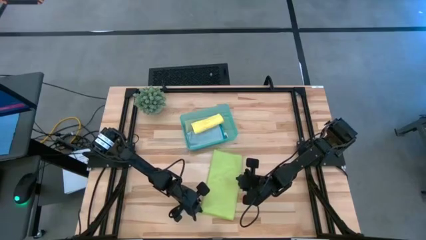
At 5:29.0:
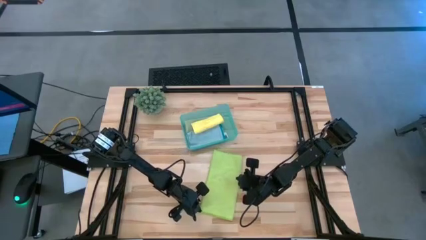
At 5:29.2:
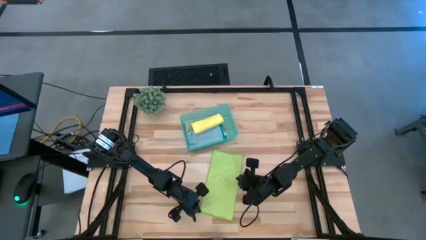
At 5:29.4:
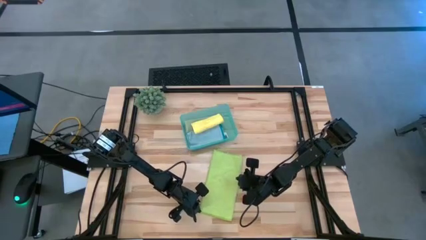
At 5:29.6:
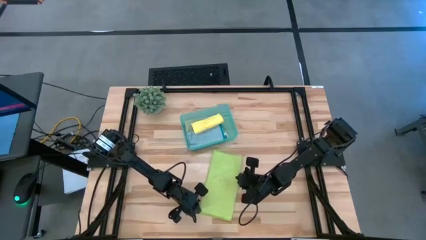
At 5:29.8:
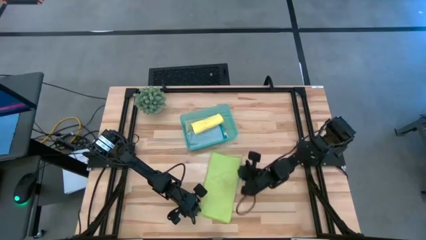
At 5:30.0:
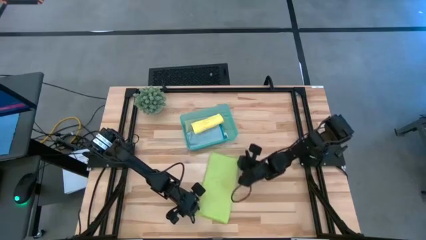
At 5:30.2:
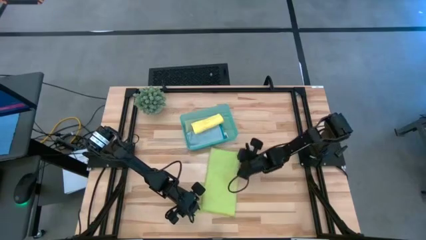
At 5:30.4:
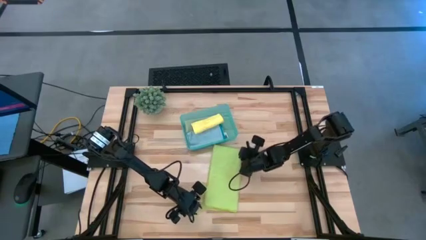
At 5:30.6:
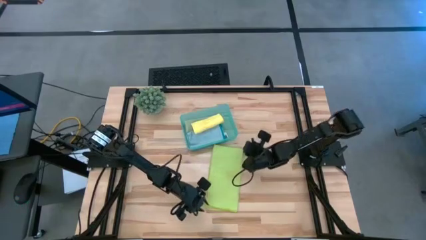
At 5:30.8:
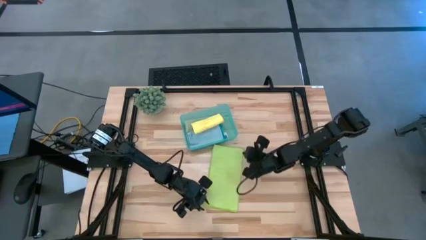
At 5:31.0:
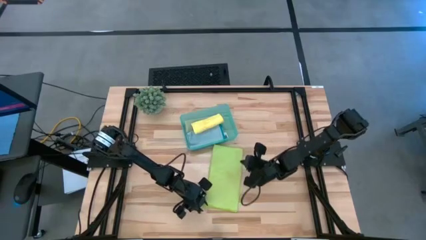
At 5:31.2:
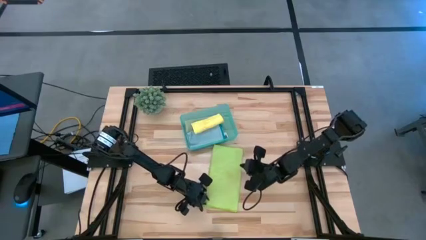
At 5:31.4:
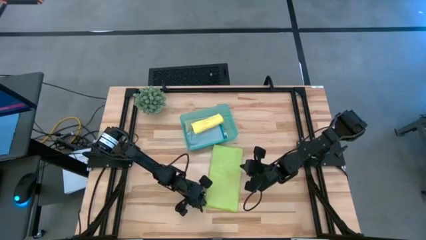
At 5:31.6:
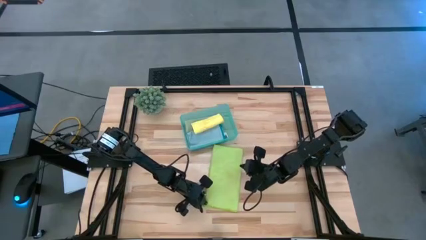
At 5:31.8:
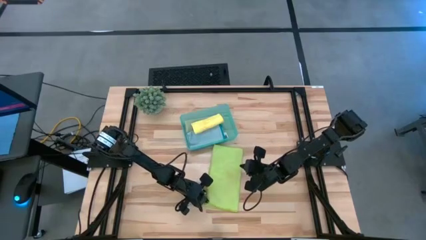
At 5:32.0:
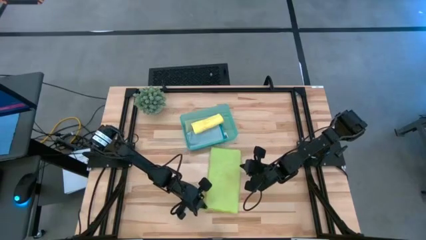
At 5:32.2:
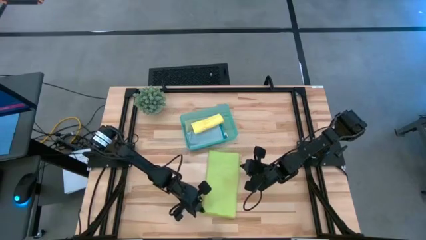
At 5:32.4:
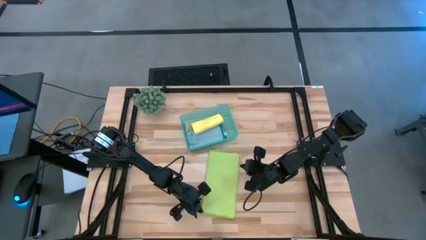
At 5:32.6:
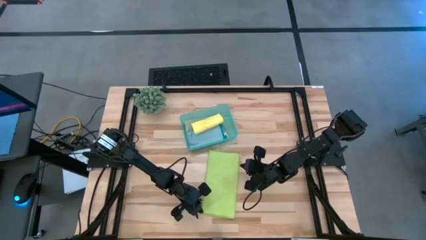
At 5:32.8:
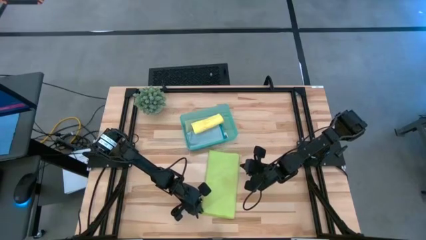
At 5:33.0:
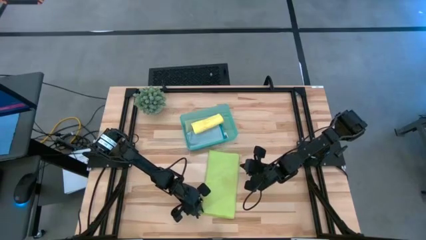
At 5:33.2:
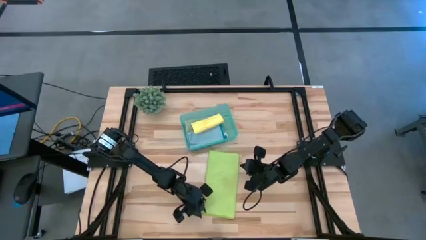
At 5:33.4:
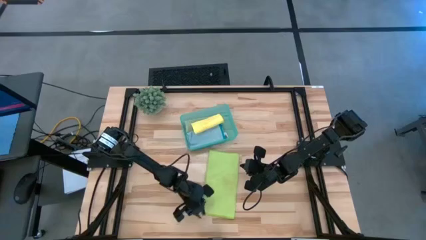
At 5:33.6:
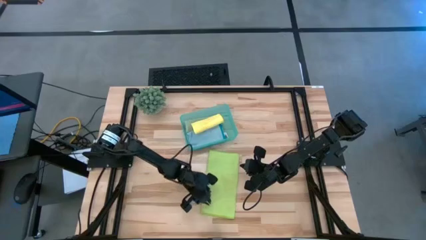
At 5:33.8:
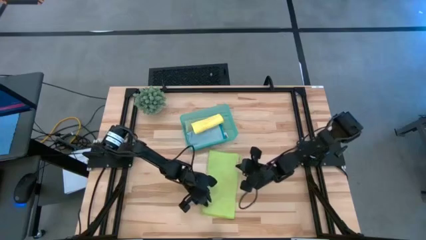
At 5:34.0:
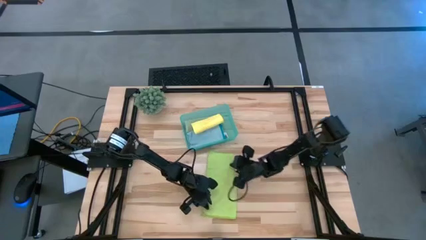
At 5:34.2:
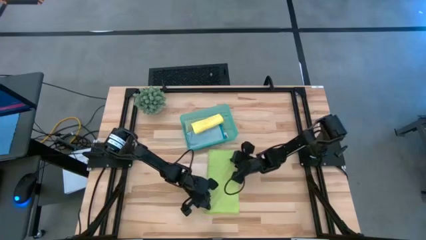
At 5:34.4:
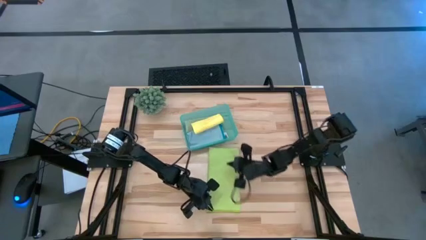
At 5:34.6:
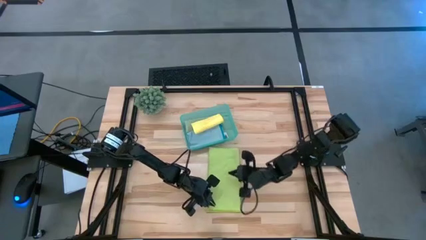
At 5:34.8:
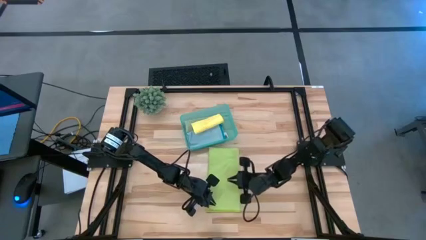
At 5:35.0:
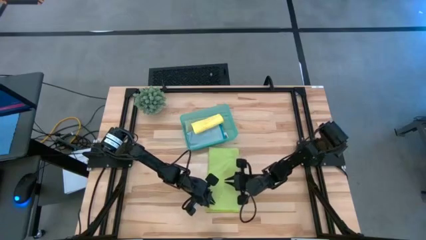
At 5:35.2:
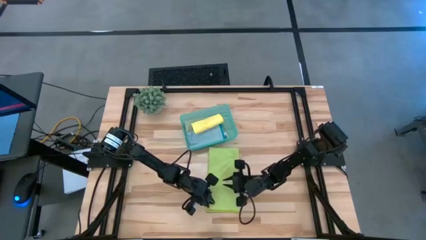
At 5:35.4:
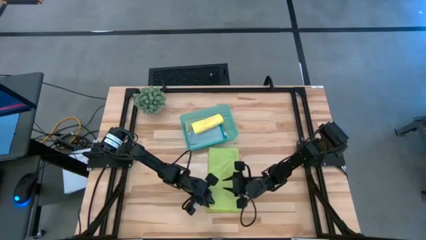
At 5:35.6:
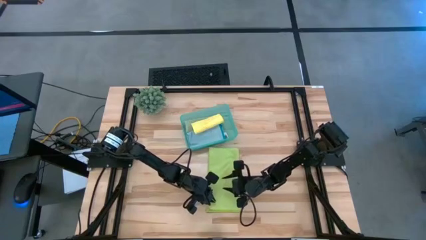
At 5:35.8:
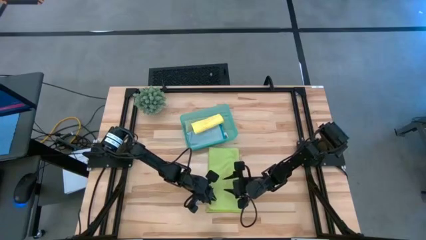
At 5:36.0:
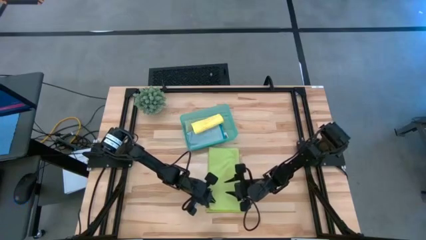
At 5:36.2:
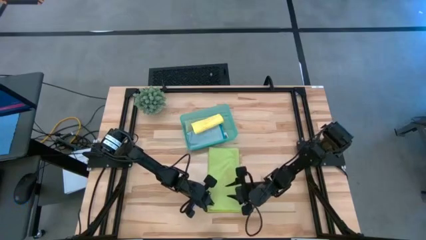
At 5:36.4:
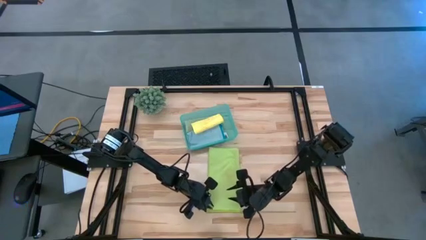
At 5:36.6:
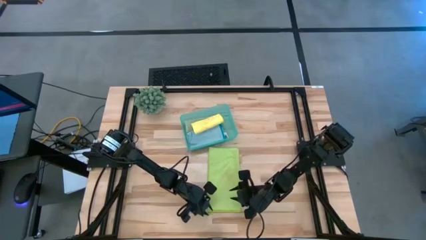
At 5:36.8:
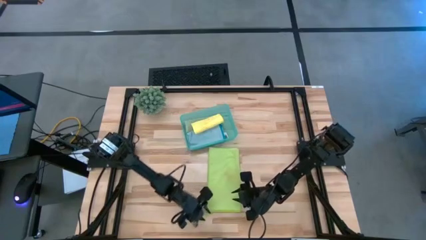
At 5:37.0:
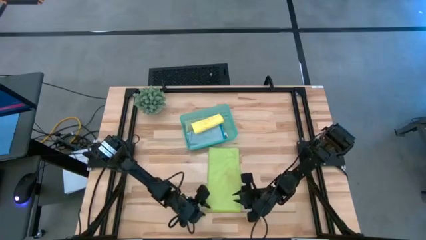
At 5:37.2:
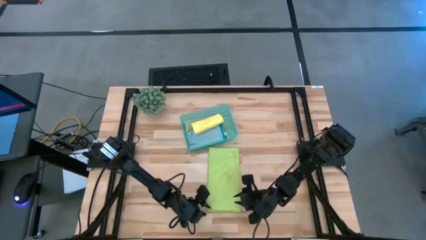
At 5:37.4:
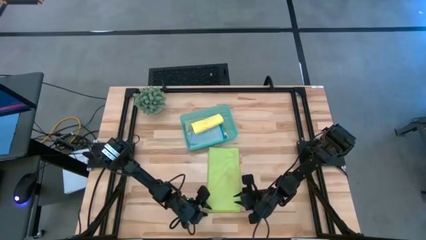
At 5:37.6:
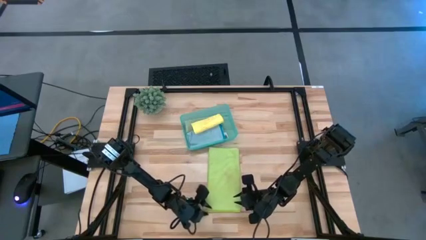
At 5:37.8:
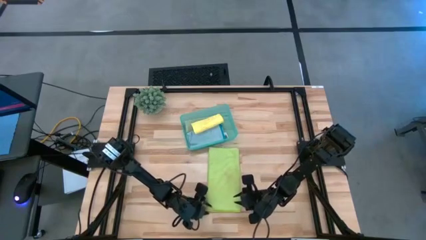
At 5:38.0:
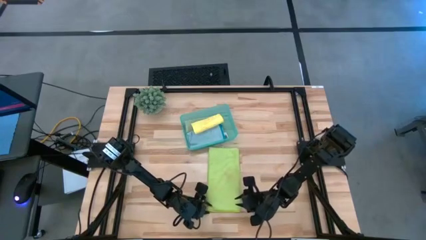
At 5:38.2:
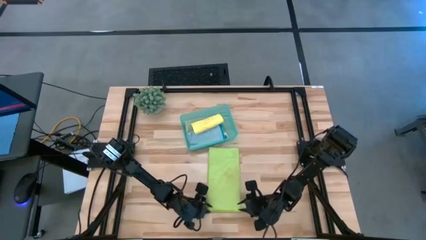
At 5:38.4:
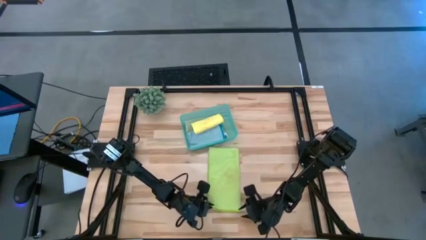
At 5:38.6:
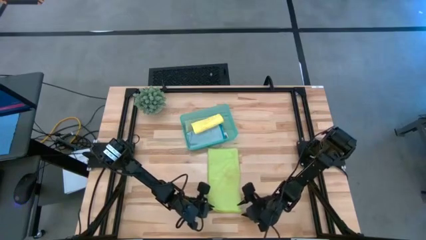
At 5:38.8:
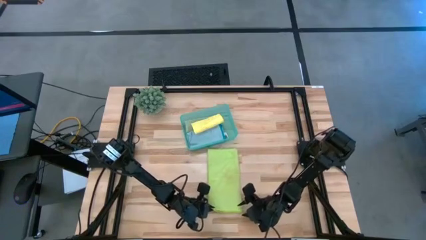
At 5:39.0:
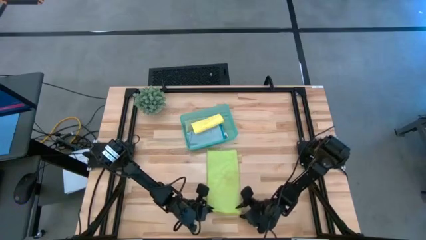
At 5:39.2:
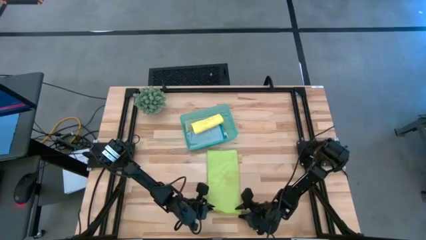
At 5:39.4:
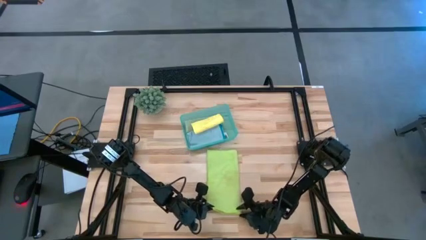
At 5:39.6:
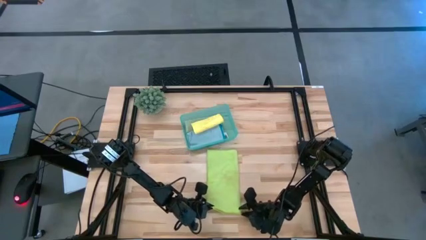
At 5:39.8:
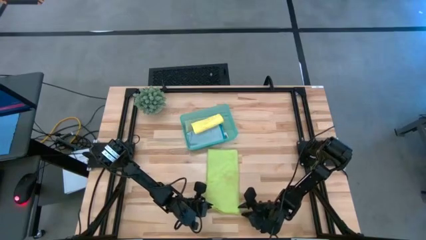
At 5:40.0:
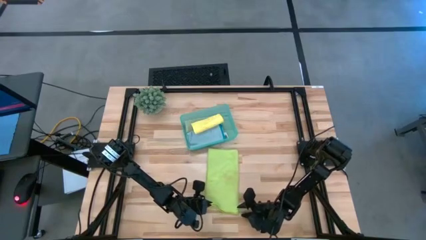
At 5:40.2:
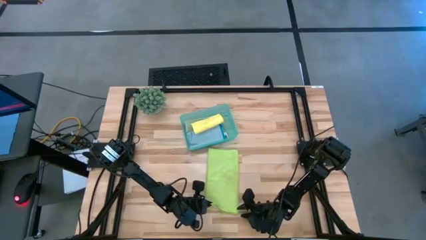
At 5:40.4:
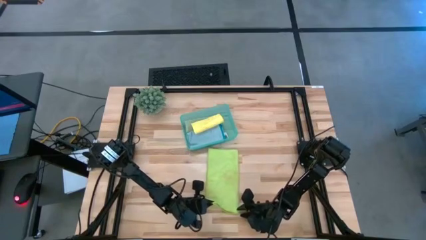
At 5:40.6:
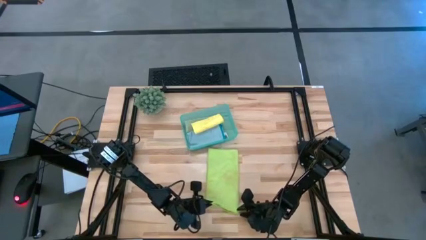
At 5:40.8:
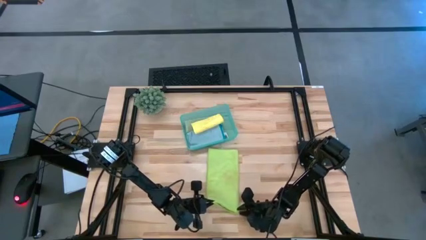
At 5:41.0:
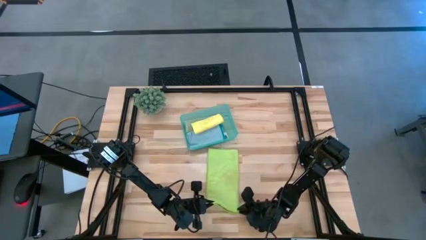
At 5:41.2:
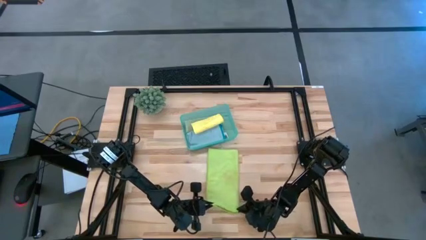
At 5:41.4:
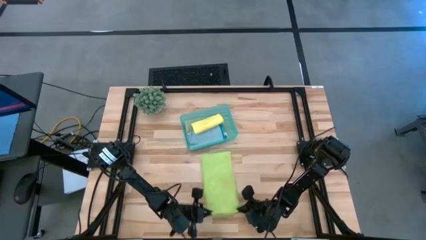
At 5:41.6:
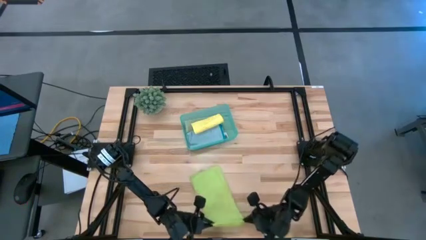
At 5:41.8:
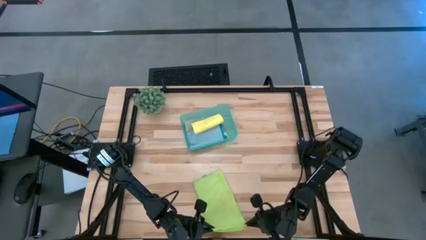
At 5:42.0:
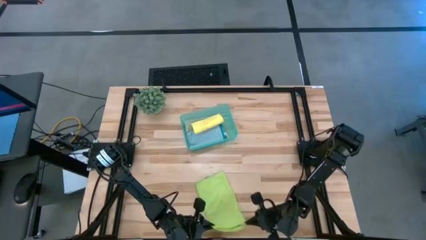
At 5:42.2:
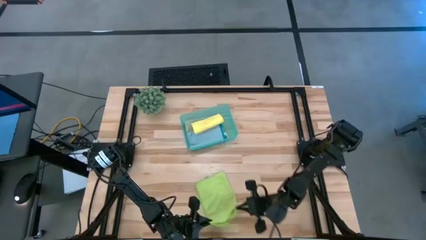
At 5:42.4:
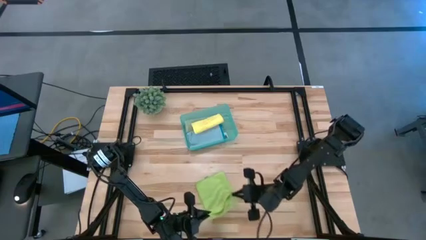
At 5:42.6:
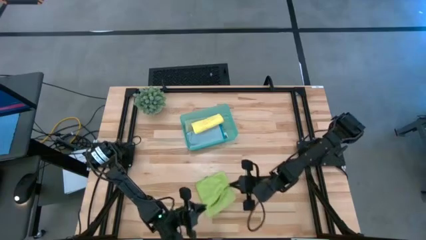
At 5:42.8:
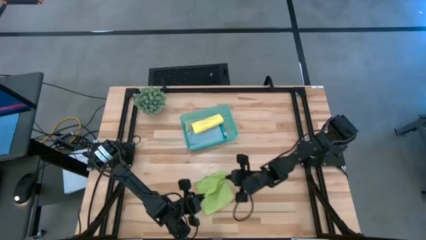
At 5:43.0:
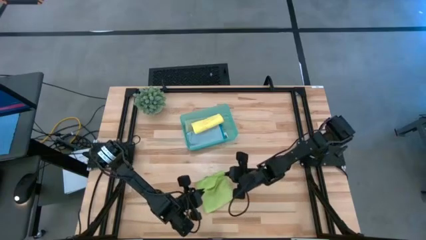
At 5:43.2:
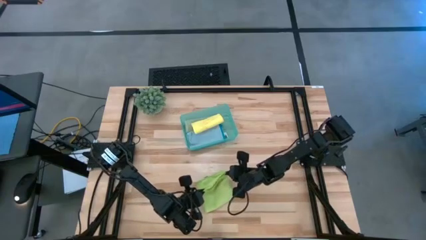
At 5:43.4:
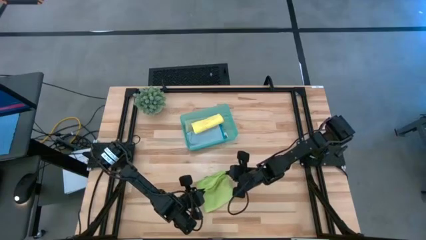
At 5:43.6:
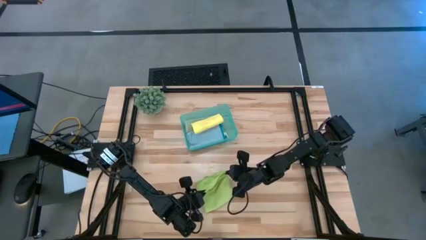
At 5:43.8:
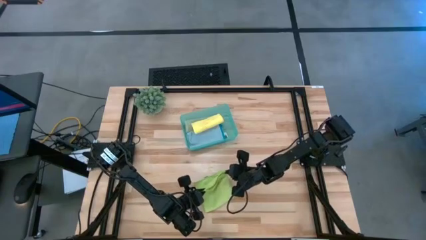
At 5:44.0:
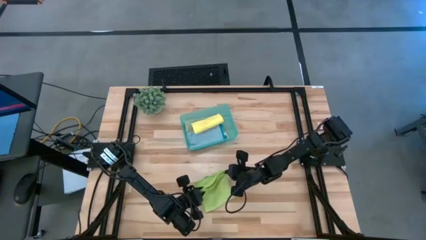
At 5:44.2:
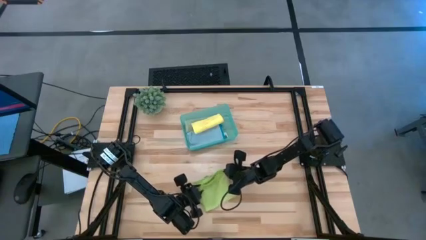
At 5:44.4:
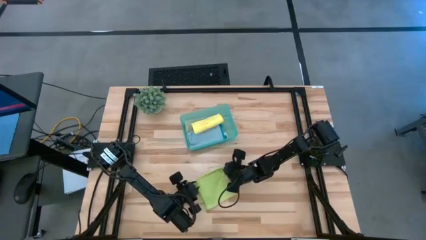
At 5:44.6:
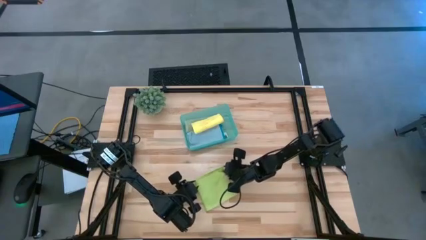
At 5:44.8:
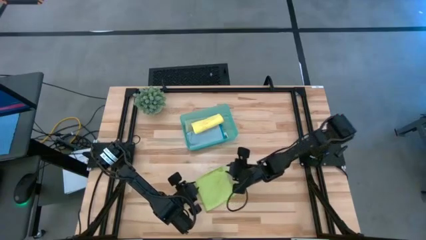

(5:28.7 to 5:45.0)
Task: Fold microfiber towels
Fold the light green towel
